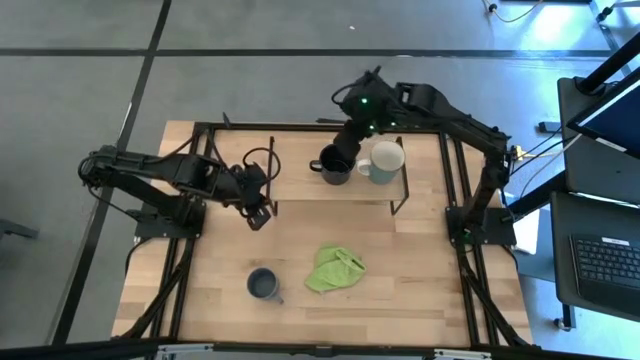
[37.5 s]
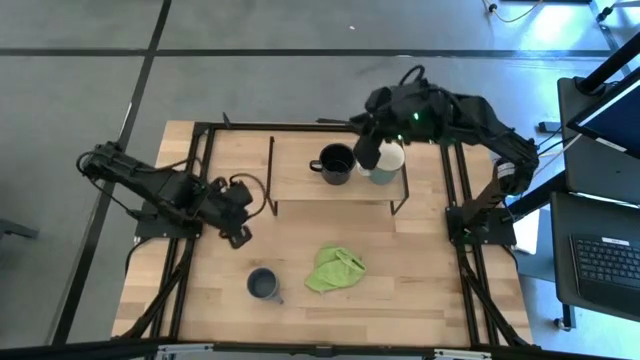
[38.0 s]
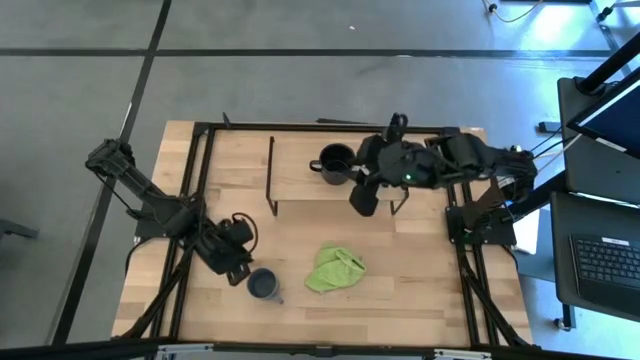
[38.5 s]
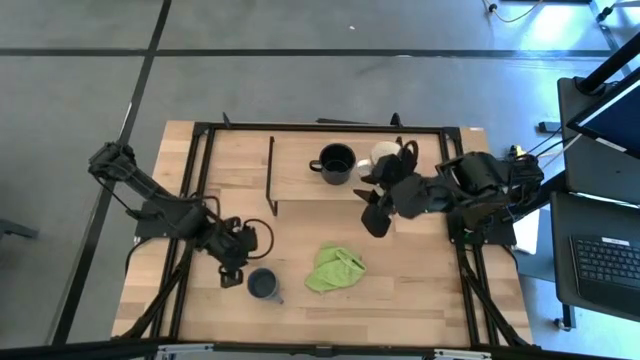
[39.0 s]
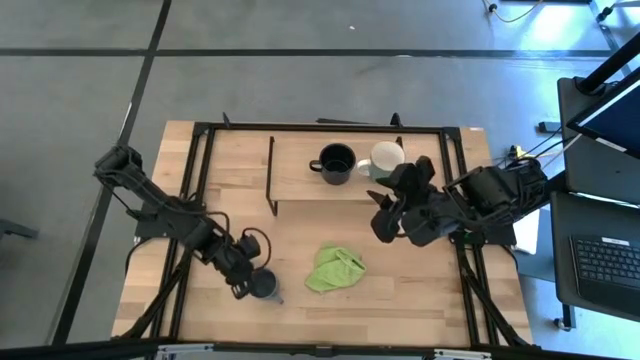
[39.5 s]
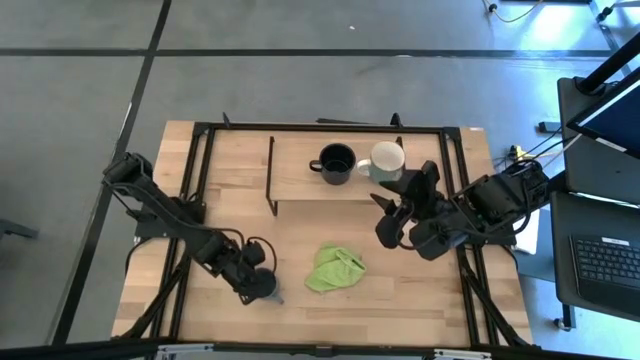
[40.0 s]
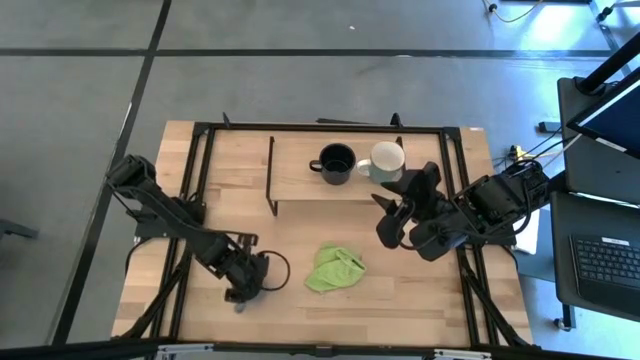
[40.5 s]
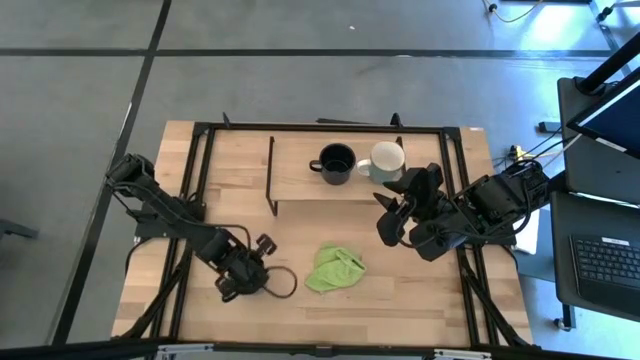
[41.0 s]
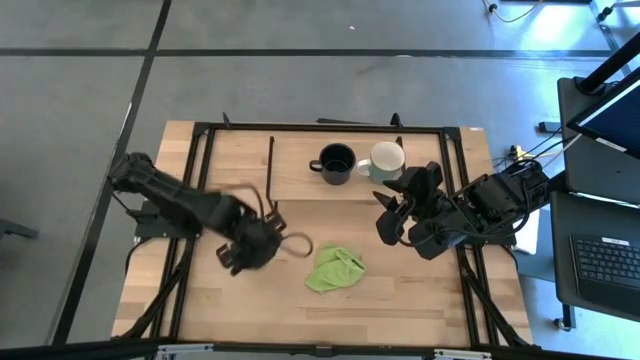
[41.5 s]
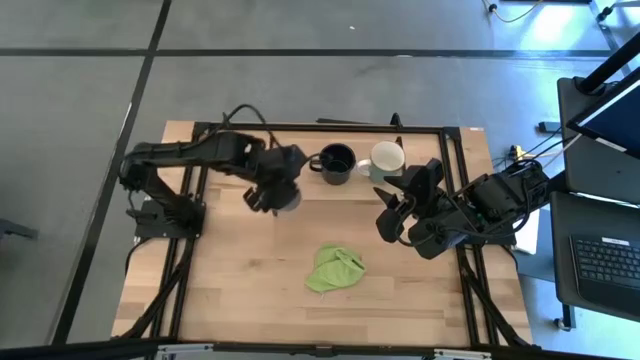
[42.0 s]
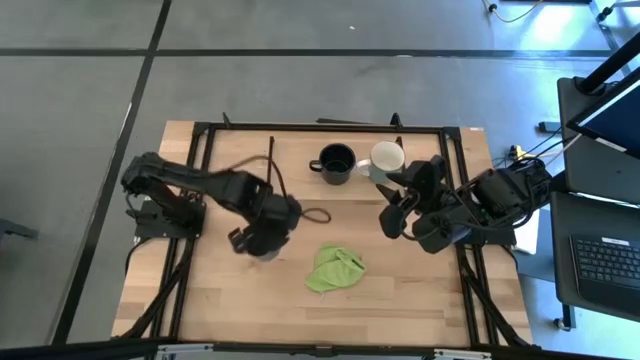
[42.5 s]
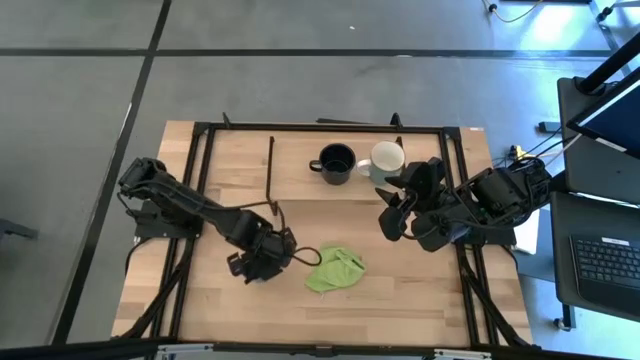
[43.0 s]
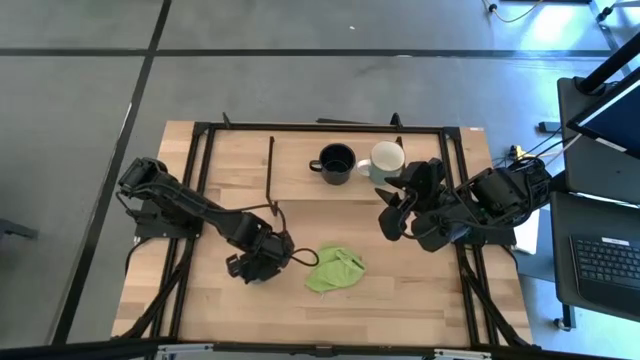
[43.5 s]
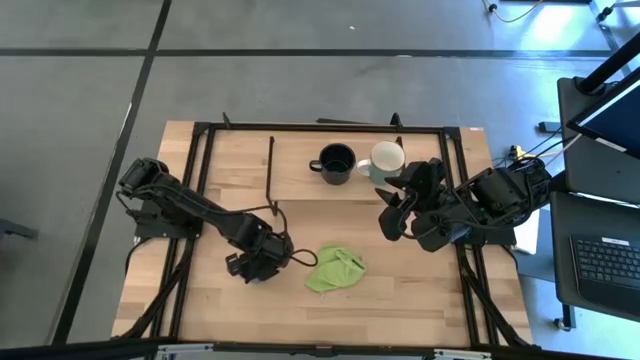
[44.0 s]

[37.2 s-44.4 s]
Task: Stack small to large cups/mugs on shelf
Put the blue mug on the shelf

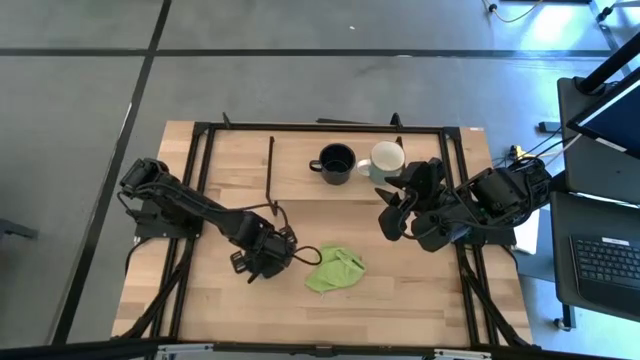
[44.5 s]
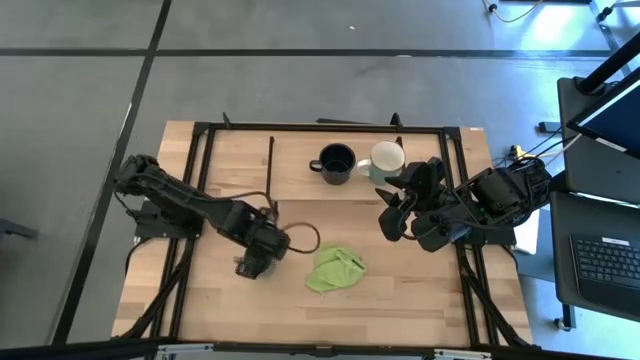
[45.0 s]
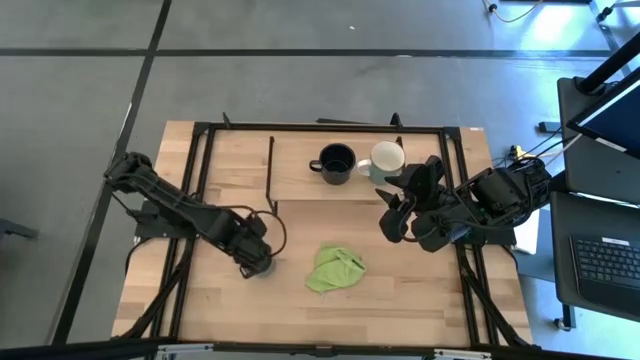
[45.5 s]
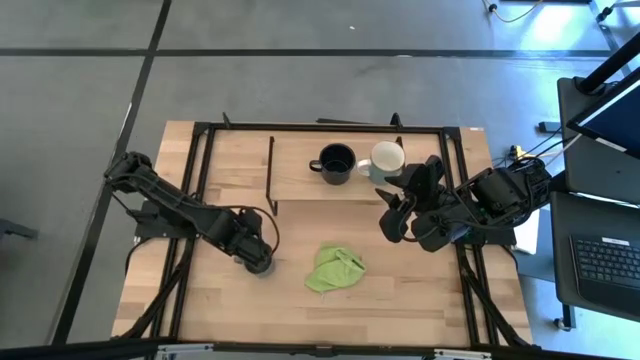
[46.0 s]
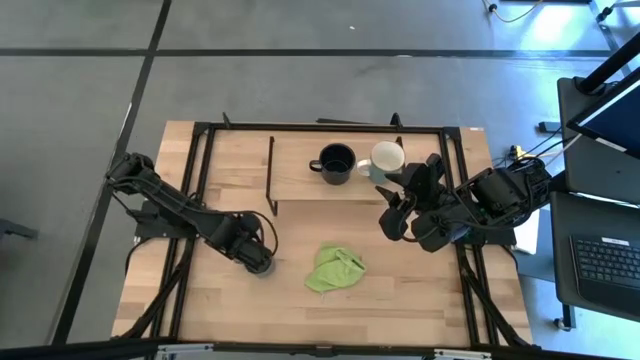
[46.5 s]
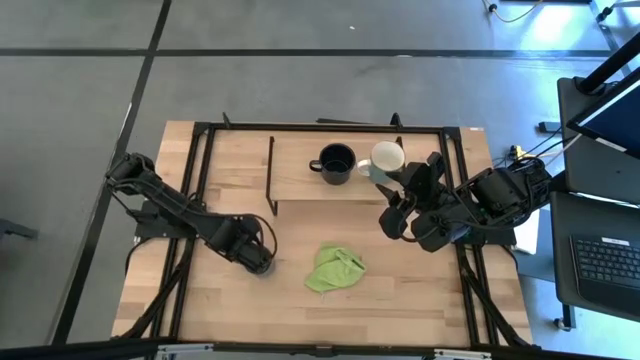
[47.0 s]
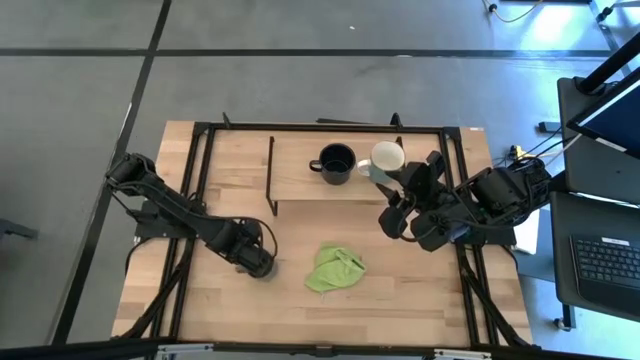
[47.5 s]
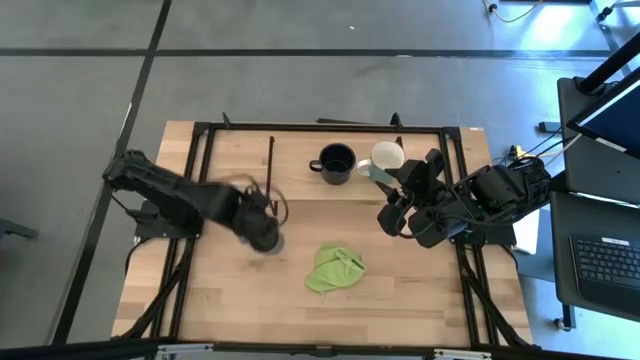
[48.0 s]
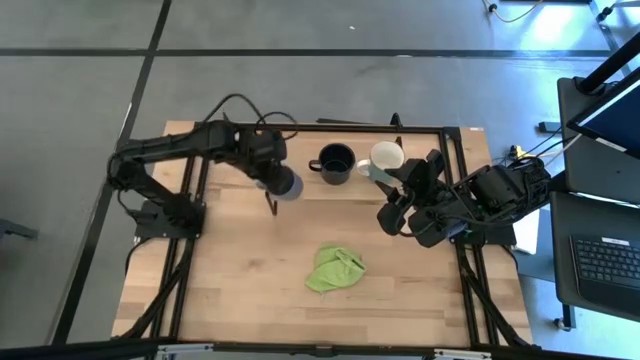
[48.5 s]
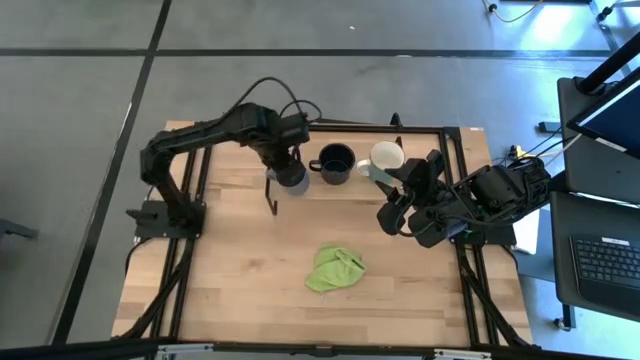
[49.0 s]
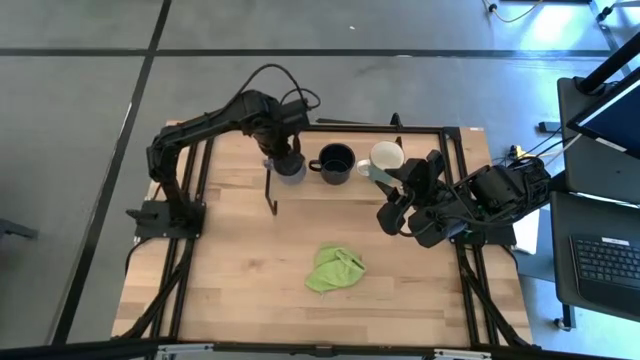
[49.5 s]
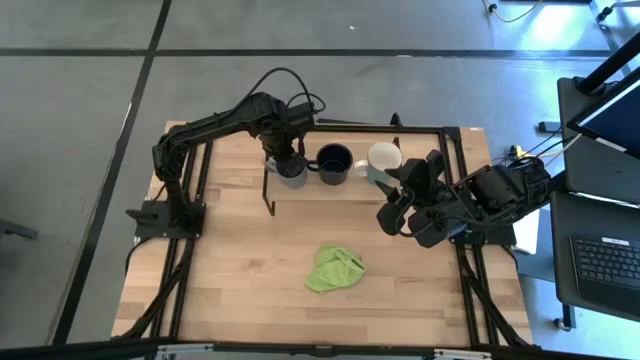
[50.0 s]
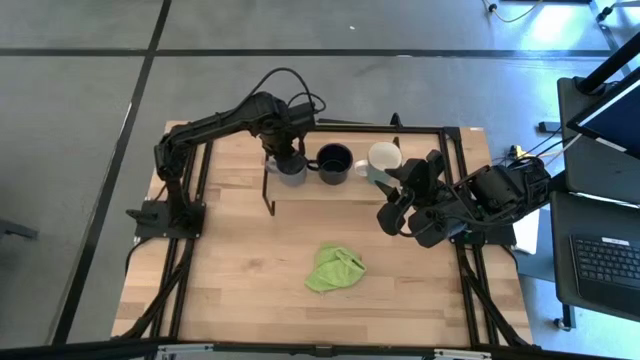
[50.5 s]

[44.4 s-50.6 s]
Put the blue mug on the shelf

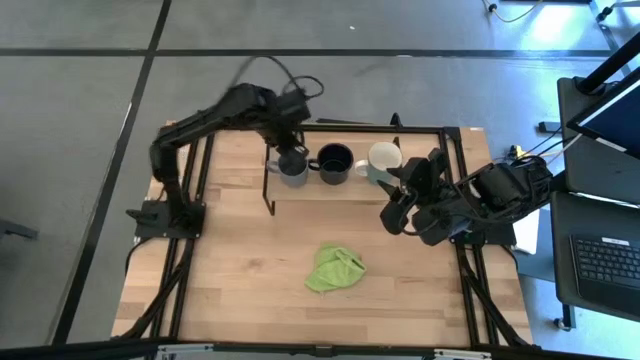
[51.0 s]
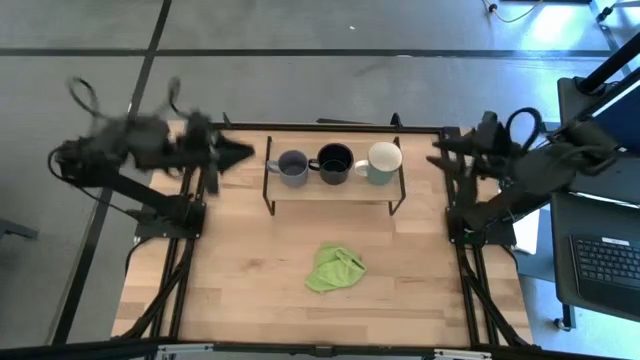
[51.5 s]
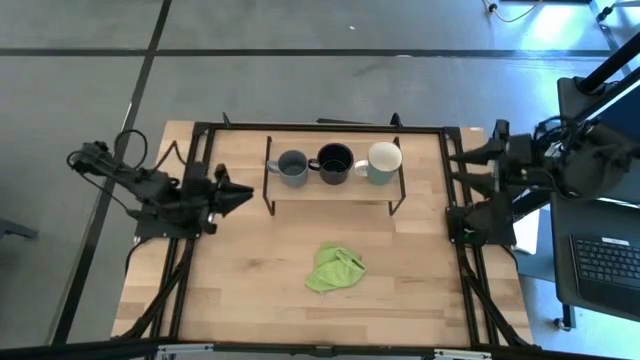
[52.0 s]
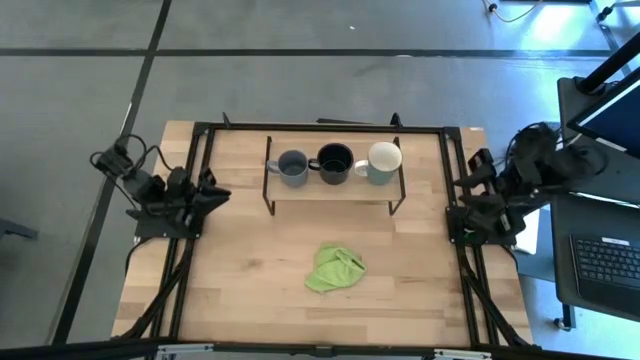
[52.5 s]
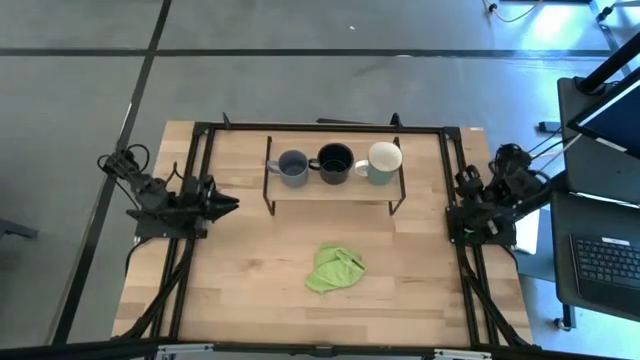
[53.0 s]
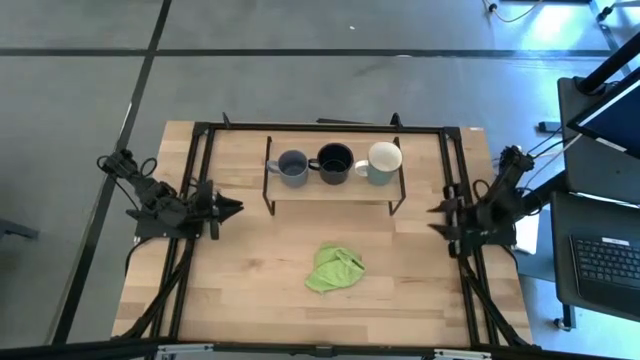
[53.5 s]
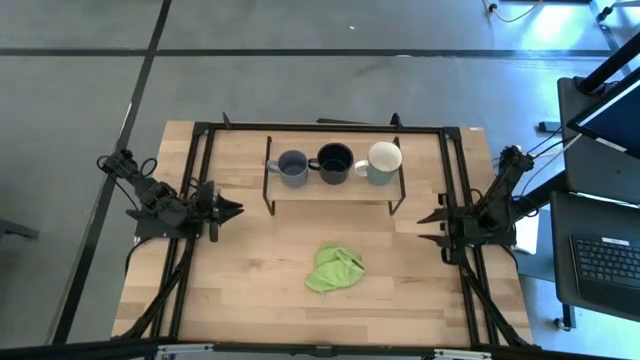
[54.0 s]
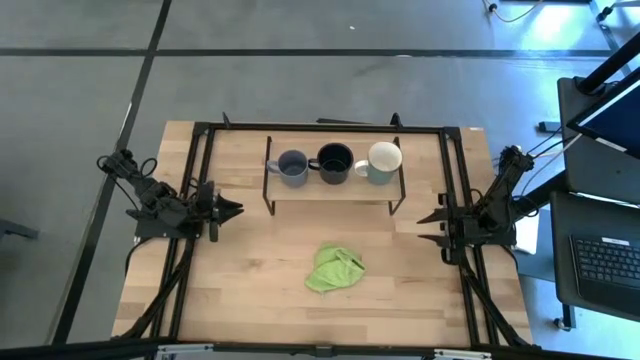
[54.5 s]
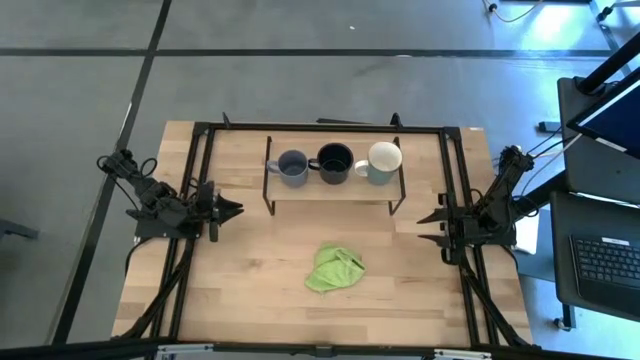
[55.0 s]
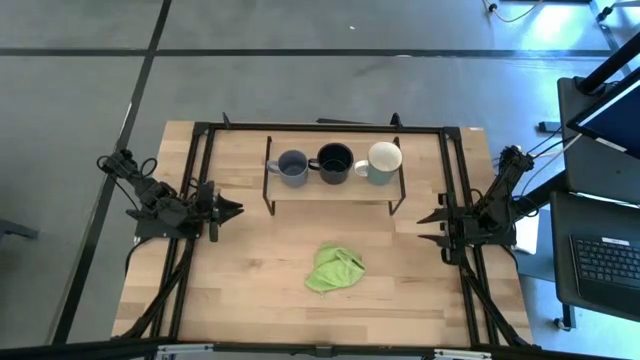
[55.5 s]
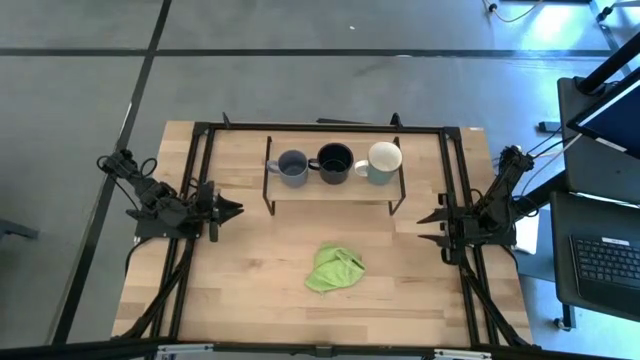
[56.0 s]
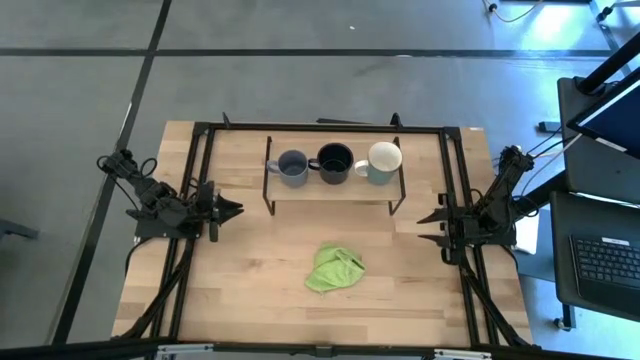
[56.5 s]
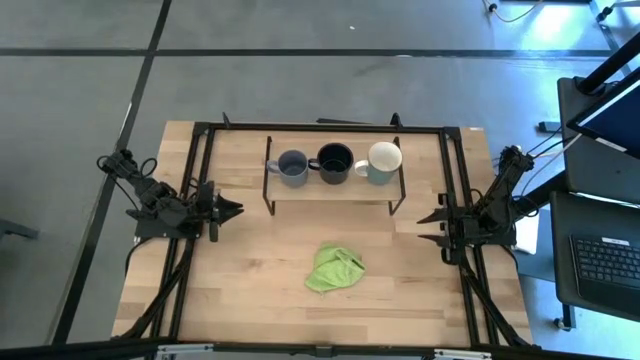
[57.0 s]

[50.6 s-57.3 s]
Return to Home Position

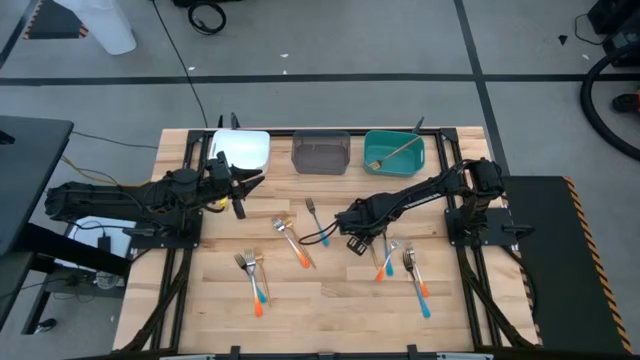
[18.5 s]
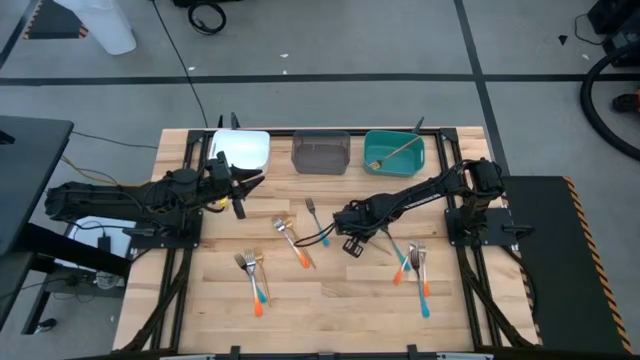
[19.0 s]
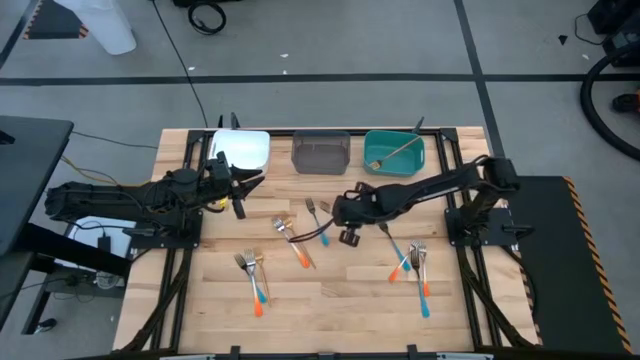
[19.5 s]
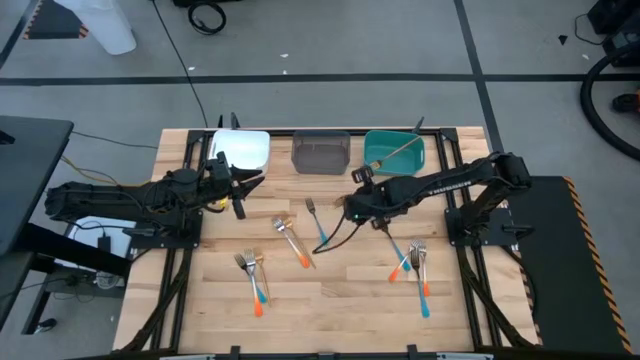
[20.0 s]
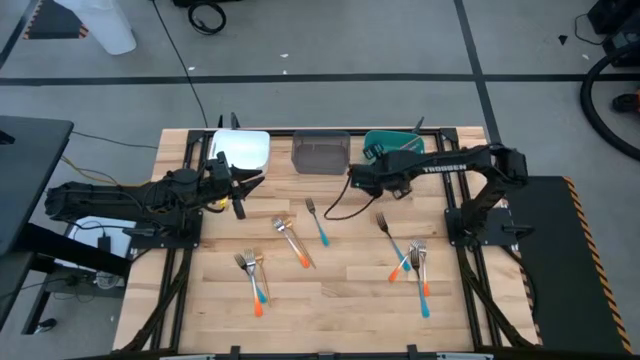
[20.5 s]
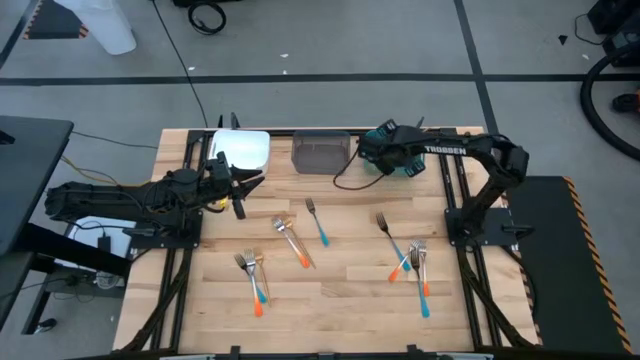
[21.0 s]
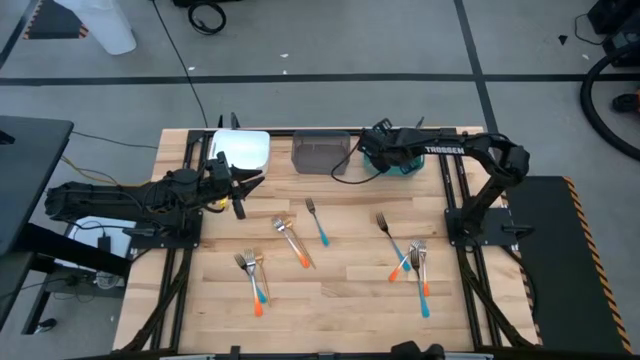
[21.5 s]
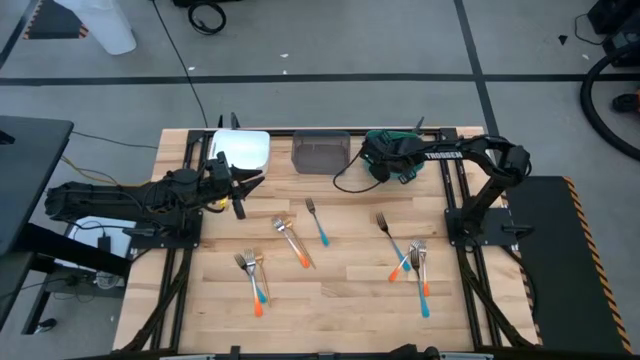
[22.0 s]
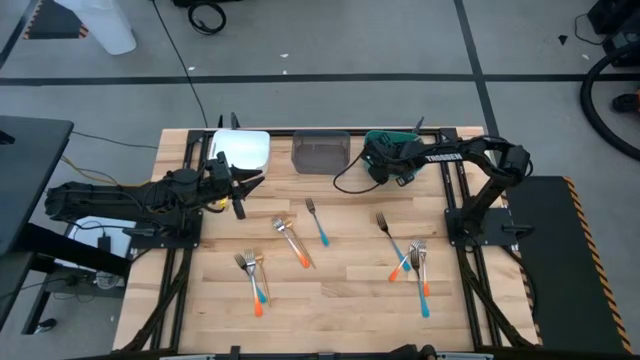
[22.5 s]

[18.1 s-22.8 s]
Task: Sort silverware by color (type)
Put the gold fork into the green bin
